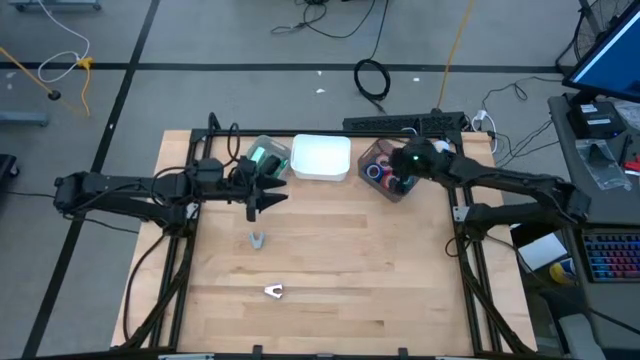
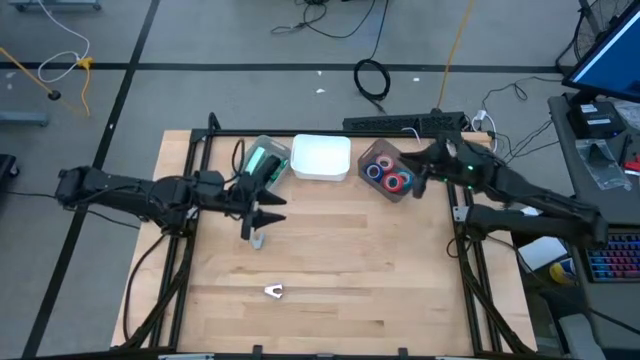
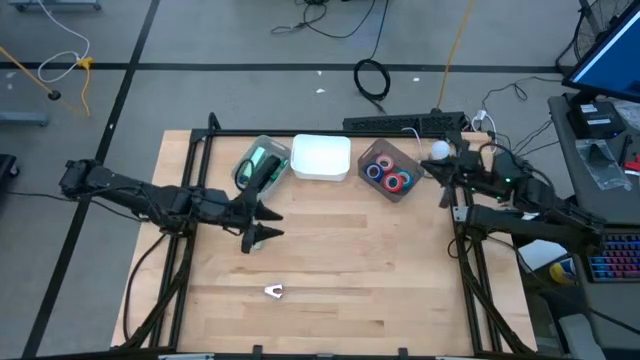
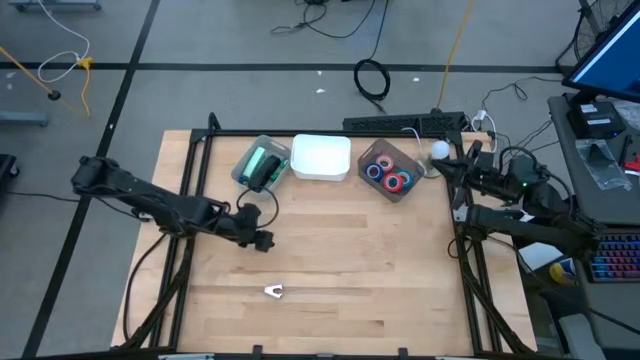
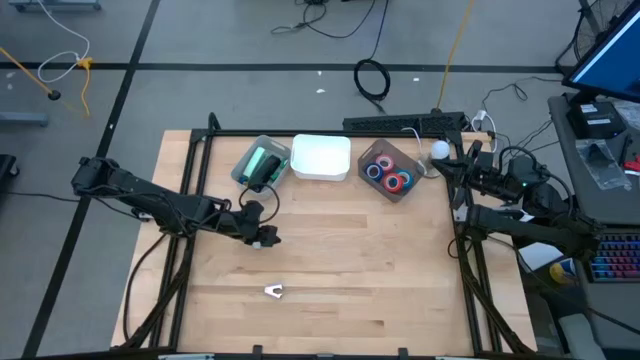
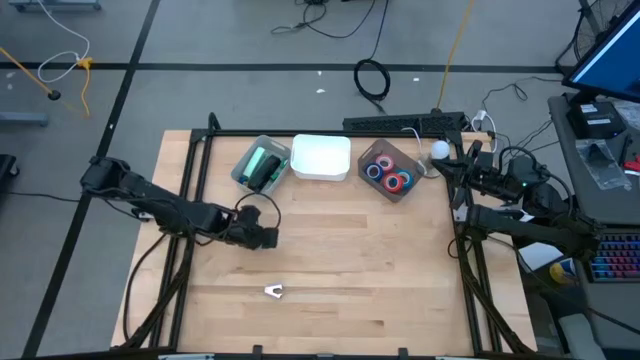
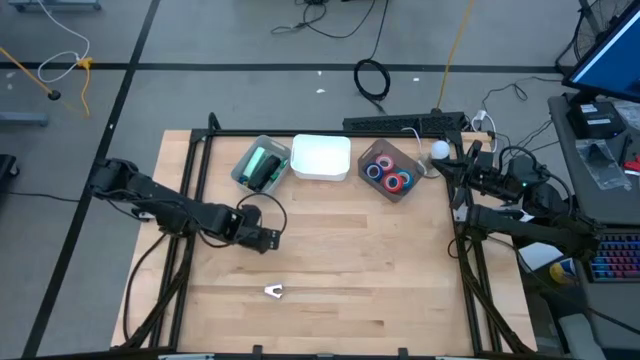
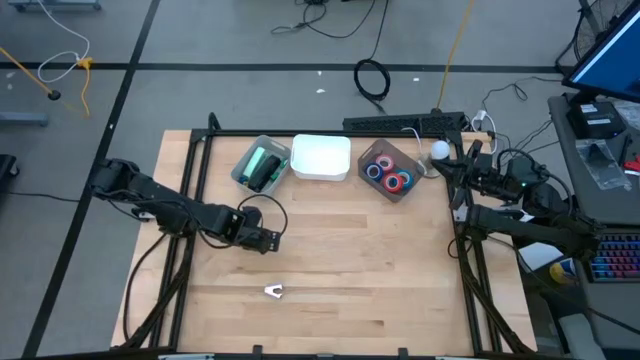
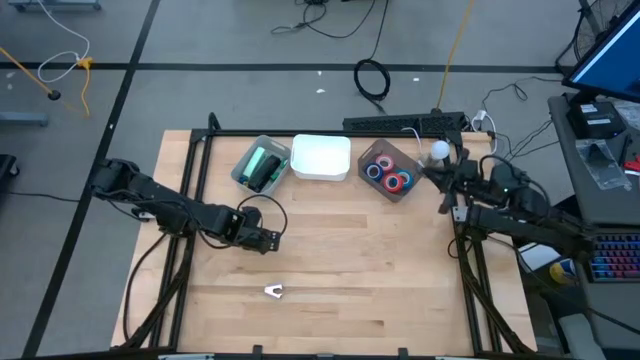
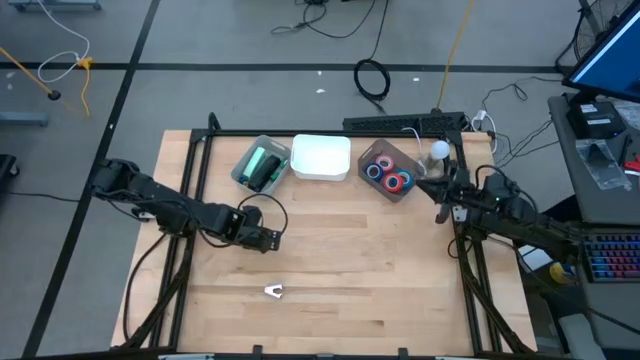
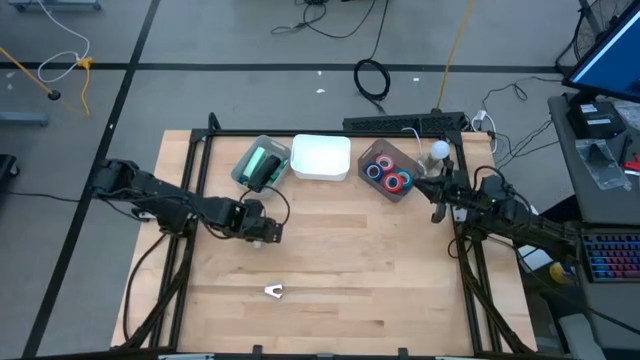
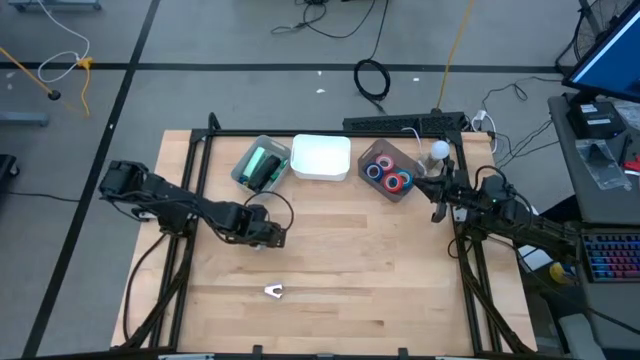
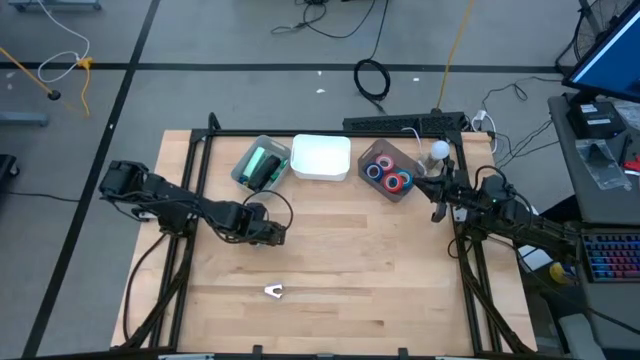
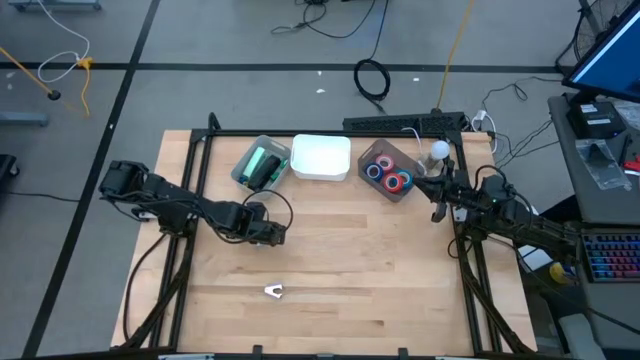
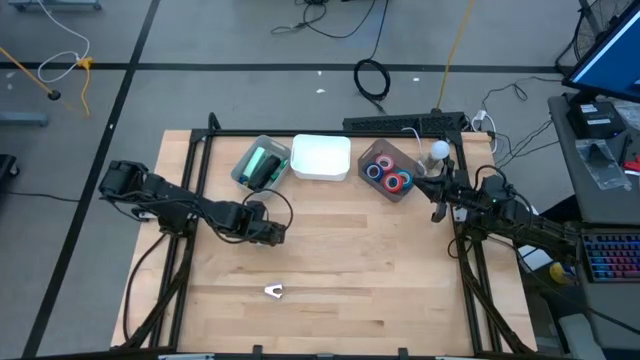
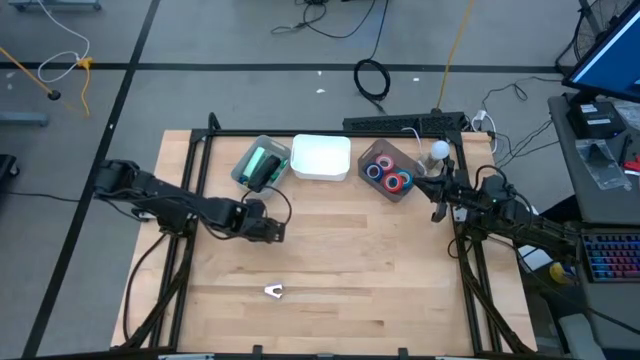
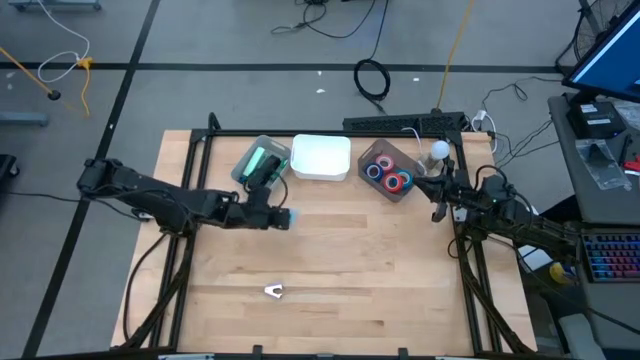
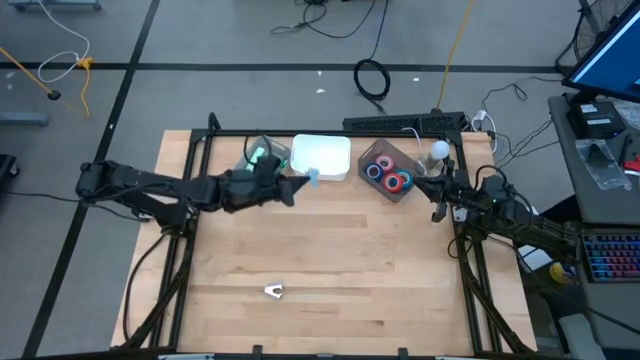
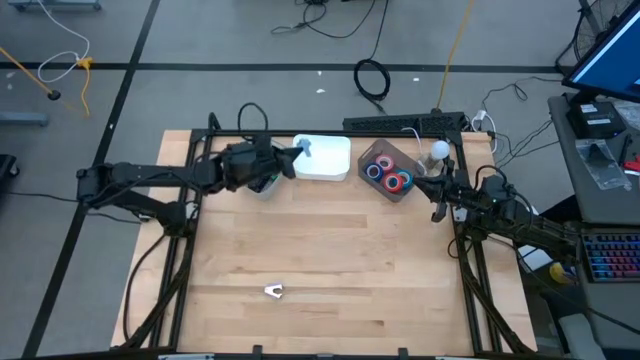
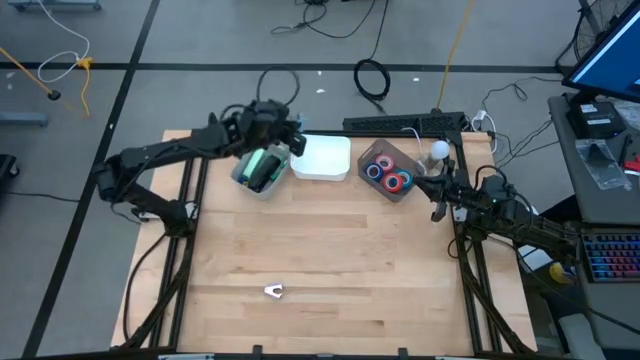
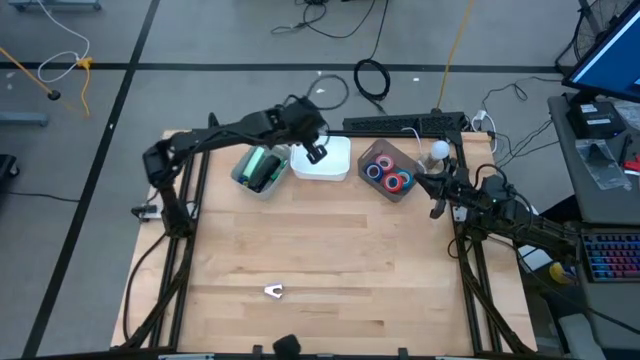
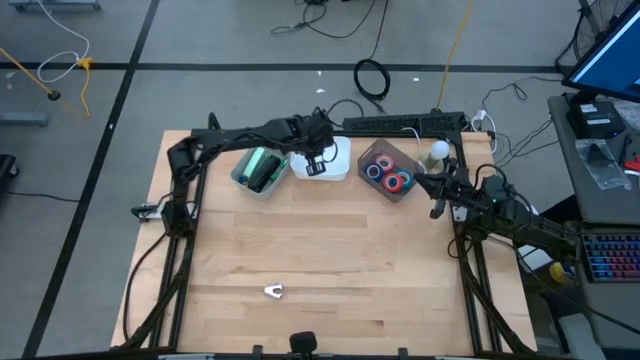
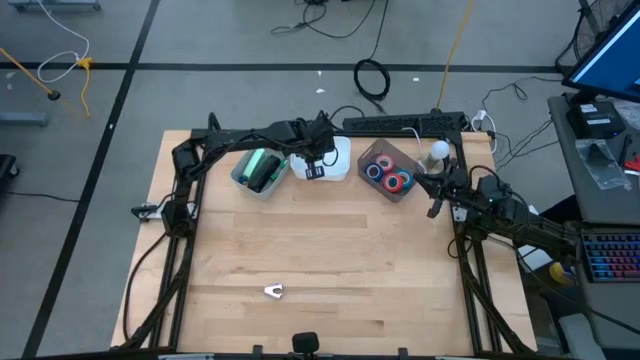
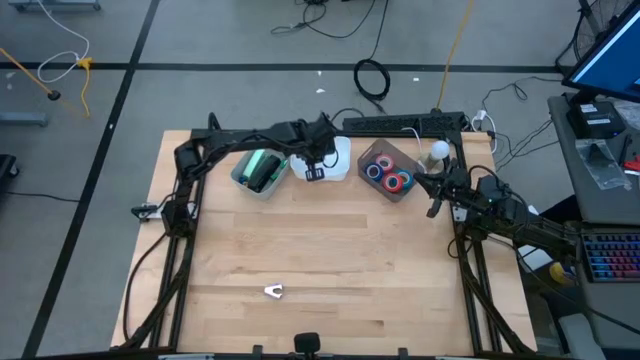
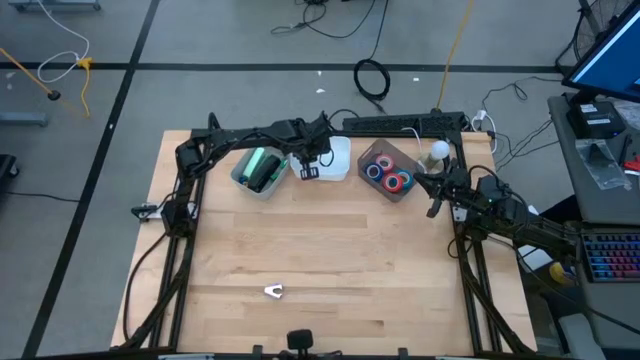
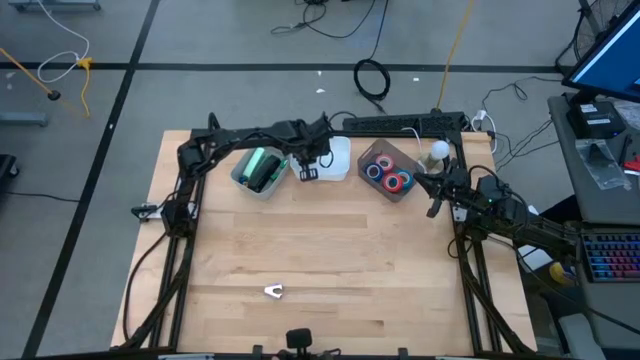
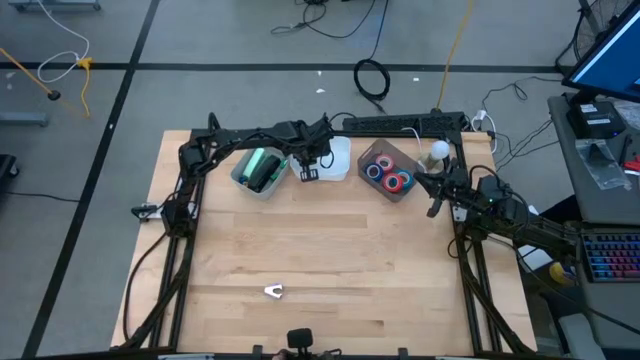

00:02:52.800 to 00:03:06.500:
Task: Pick and place Stapler, Stapler remover, tape
Put the blue staple remover into the white bin

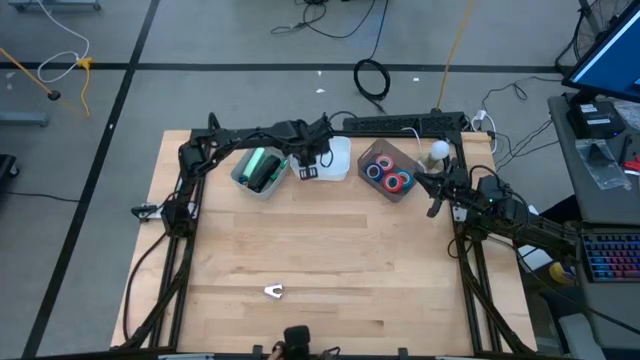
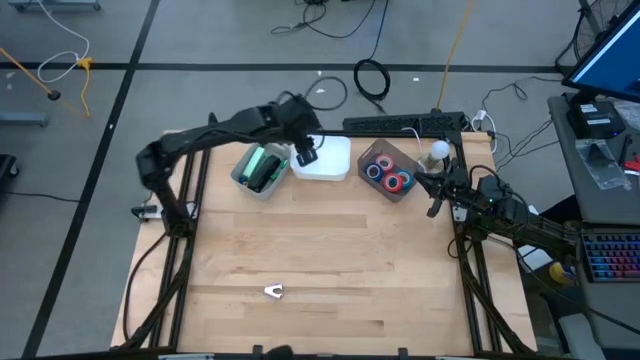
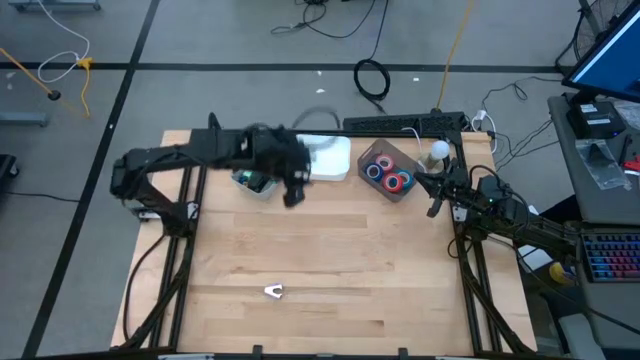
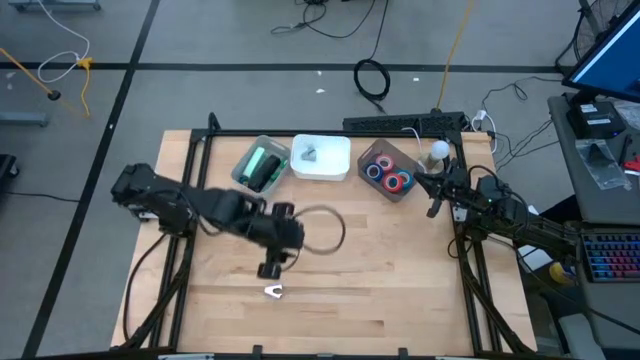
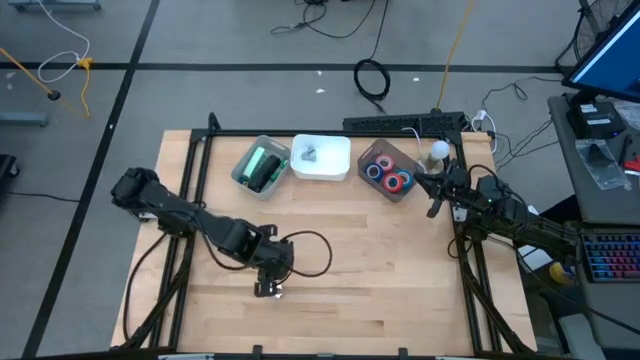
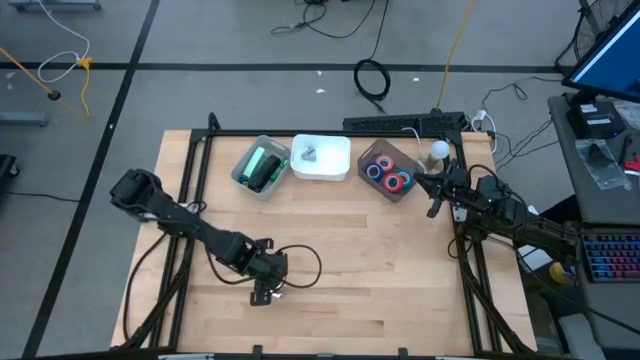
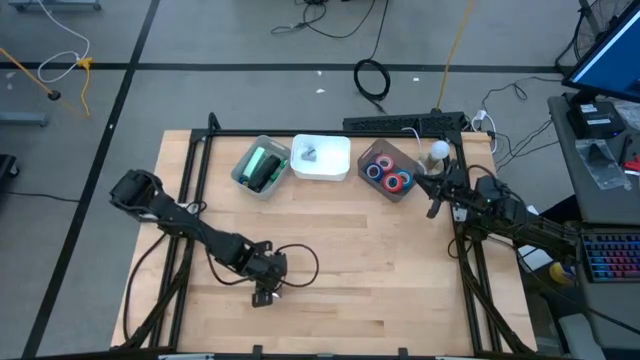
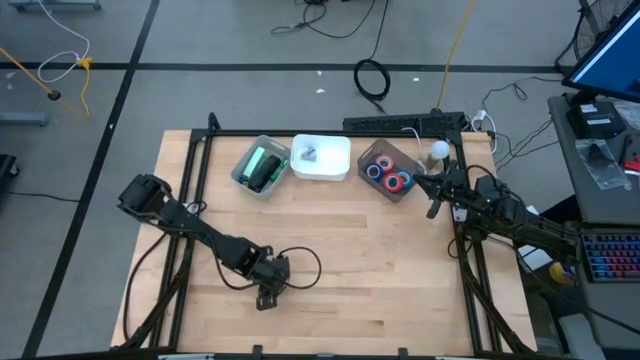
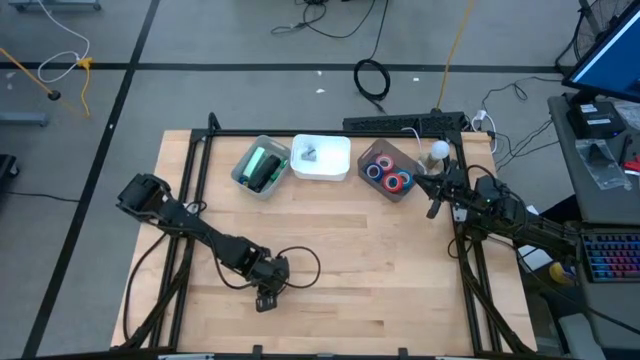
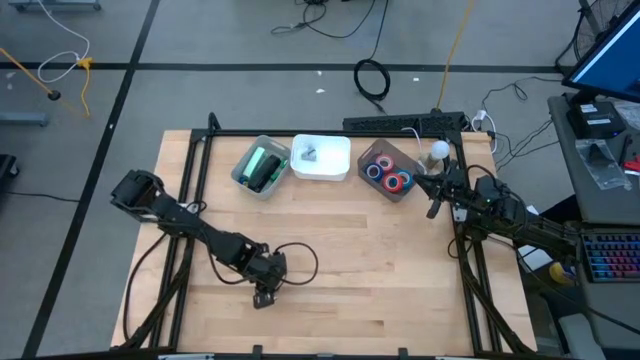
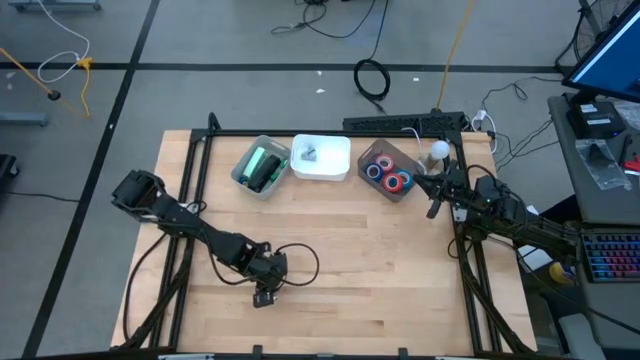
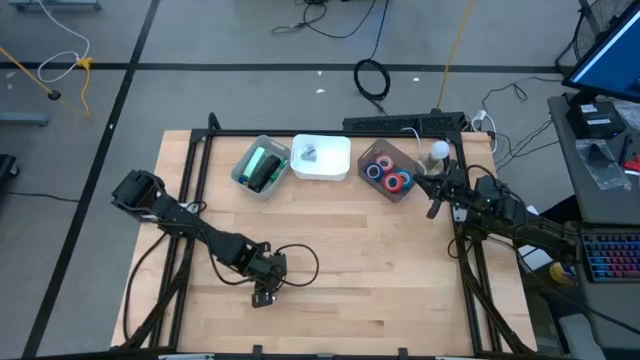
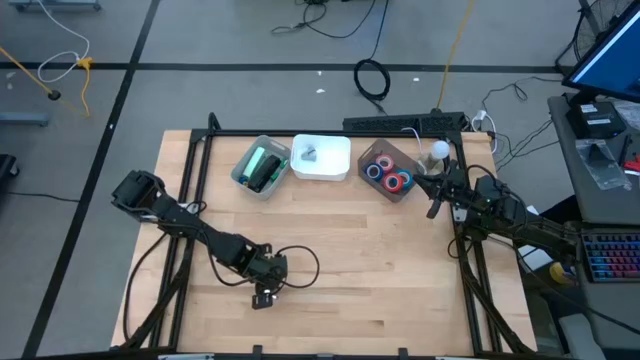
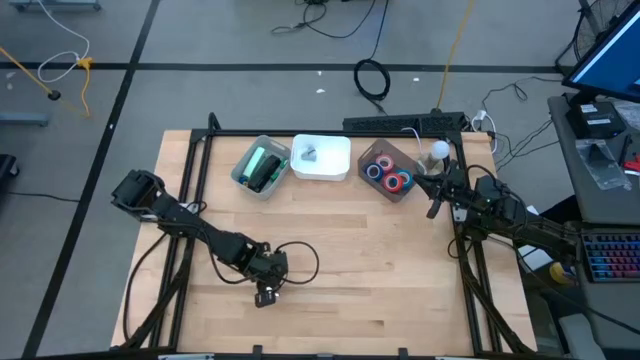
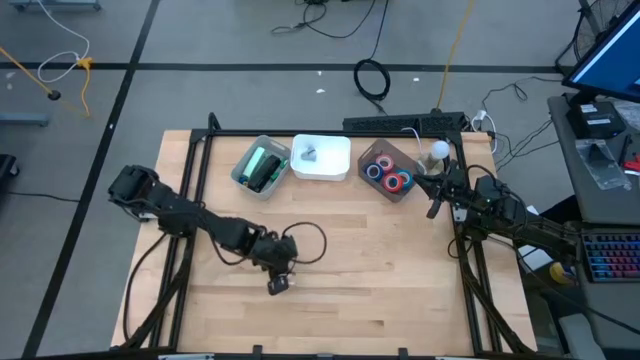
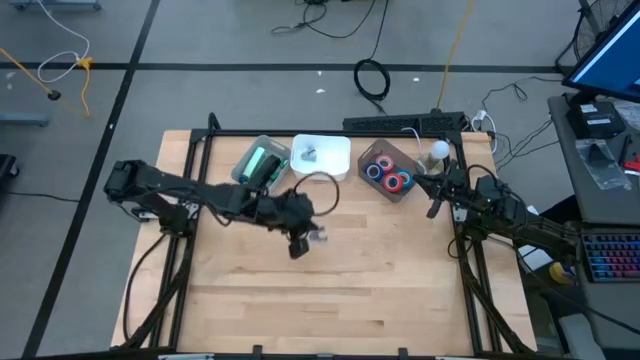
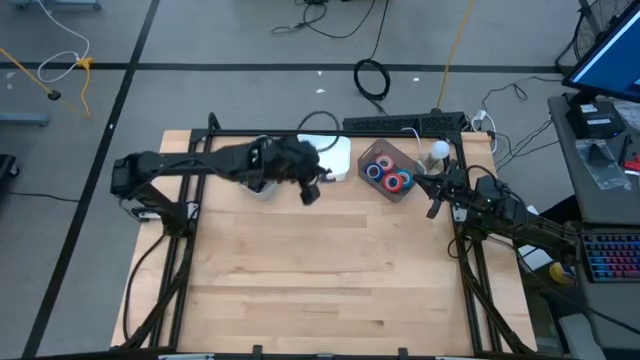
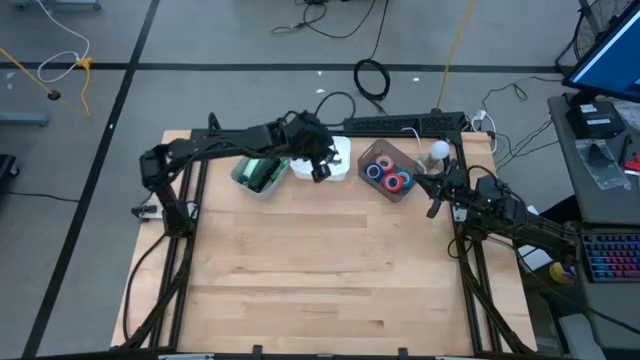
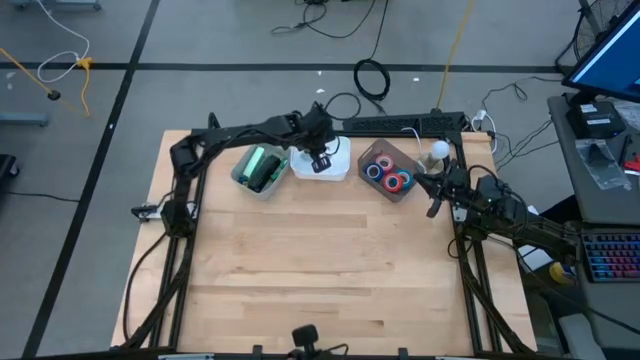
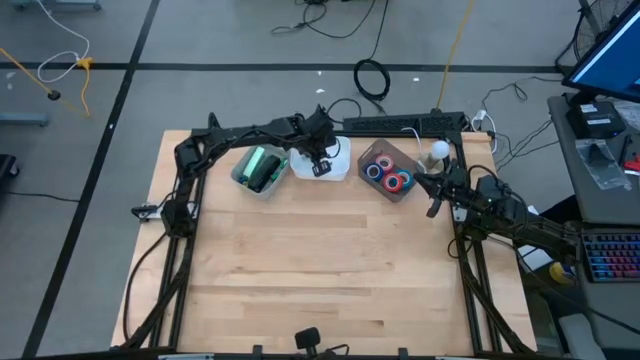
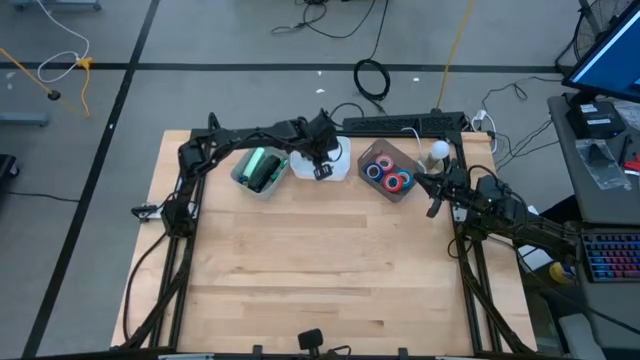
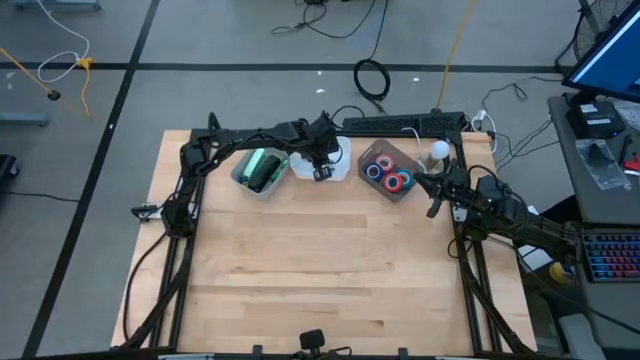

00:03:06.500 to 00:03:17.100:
Put the purple staple remover into the white bin
